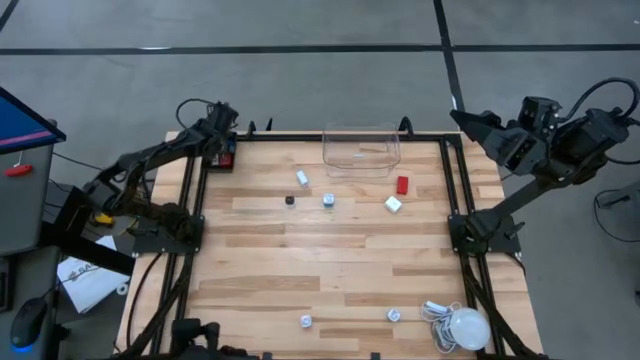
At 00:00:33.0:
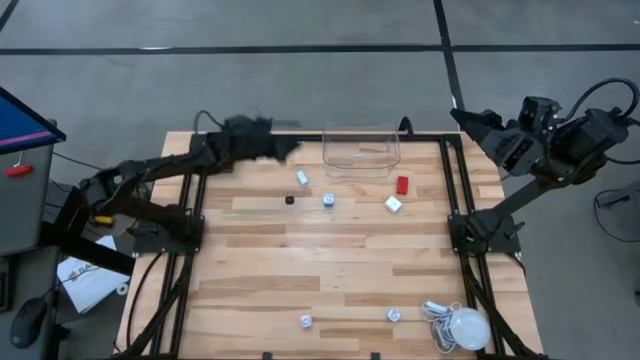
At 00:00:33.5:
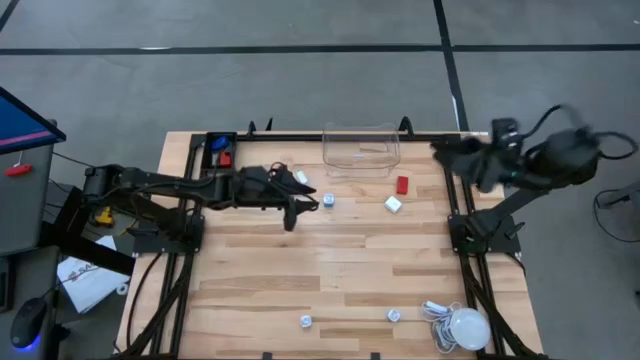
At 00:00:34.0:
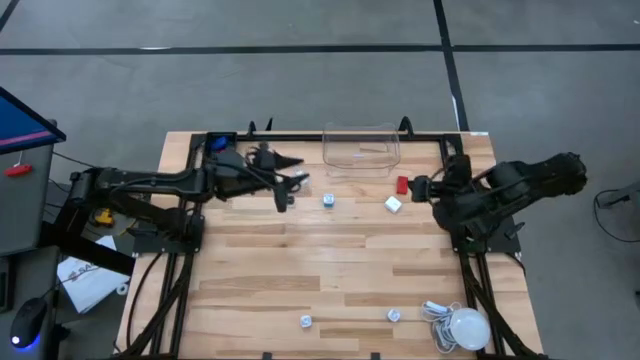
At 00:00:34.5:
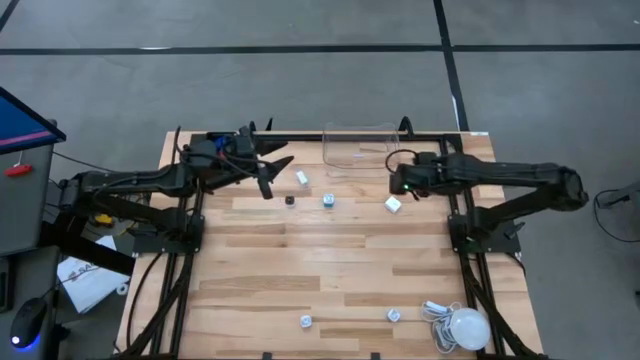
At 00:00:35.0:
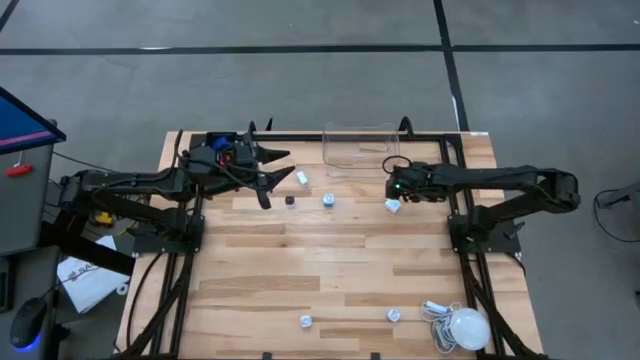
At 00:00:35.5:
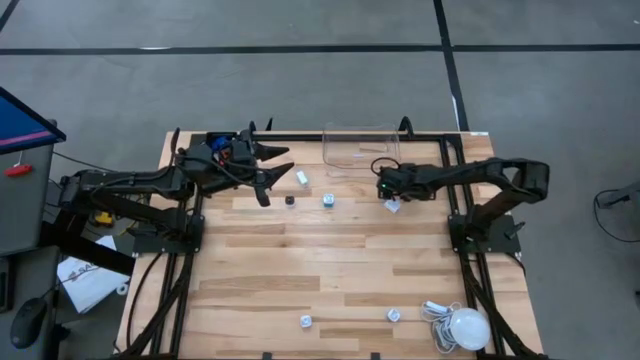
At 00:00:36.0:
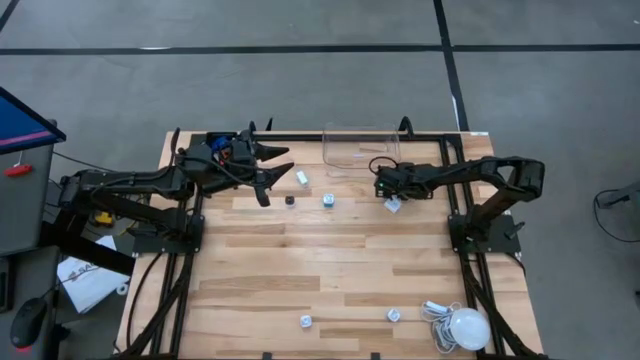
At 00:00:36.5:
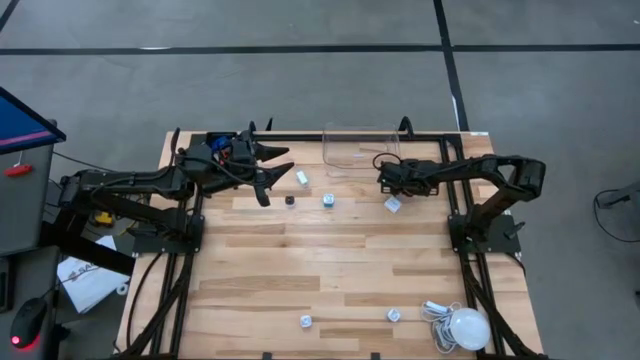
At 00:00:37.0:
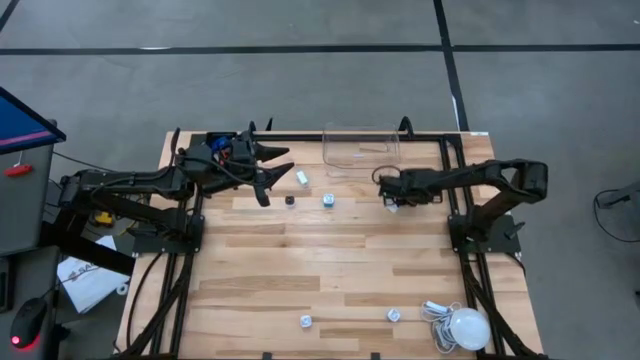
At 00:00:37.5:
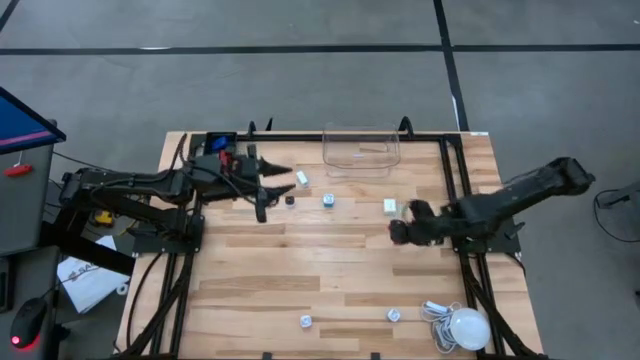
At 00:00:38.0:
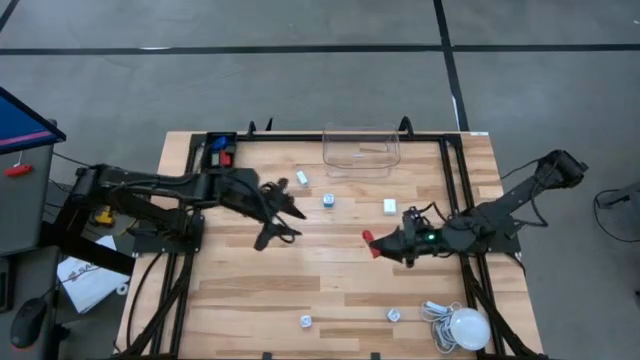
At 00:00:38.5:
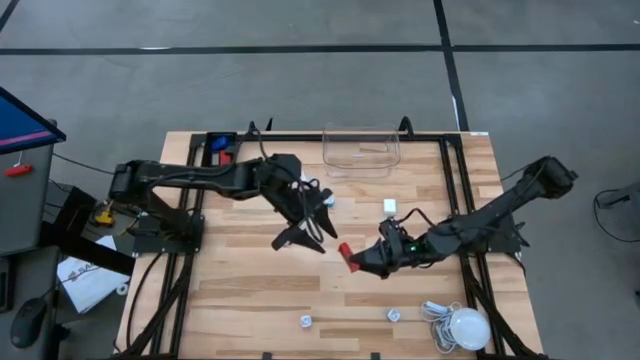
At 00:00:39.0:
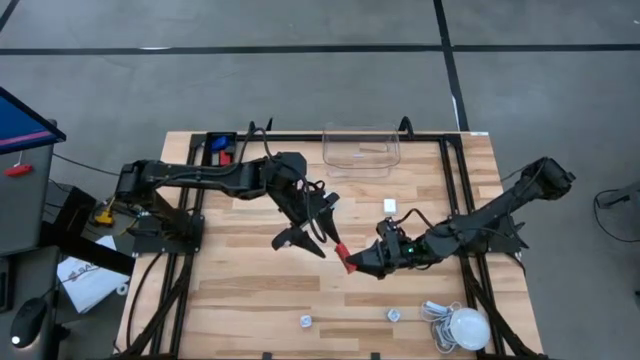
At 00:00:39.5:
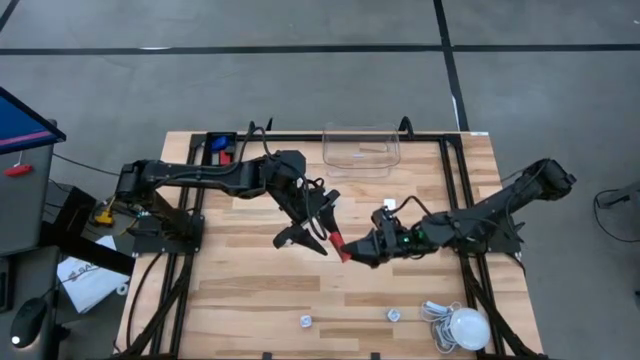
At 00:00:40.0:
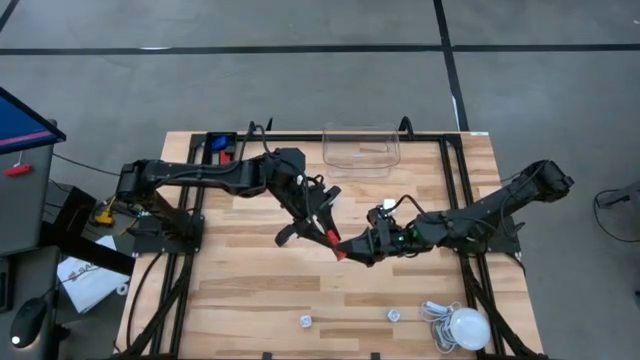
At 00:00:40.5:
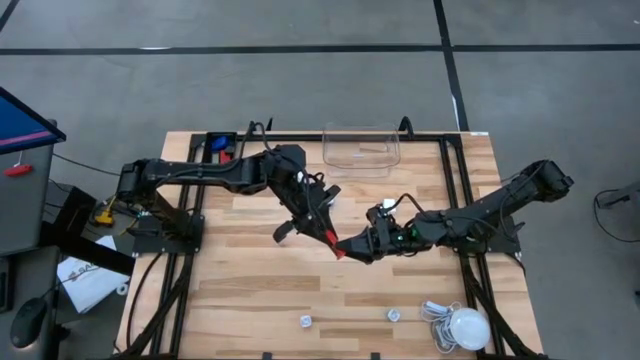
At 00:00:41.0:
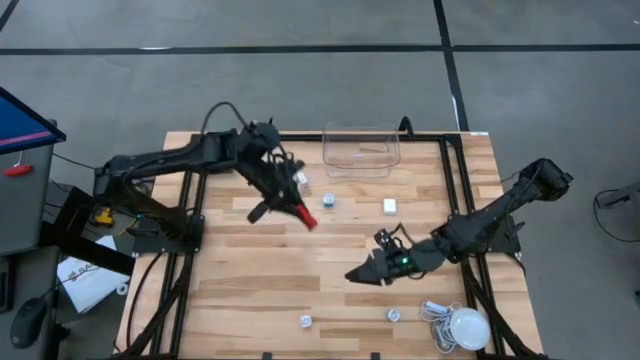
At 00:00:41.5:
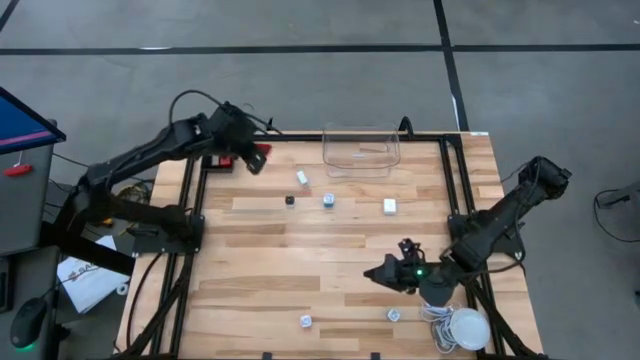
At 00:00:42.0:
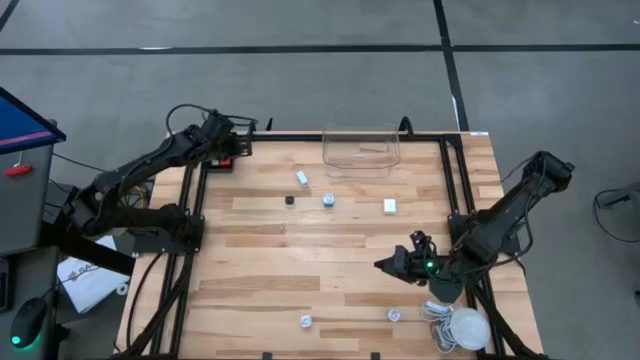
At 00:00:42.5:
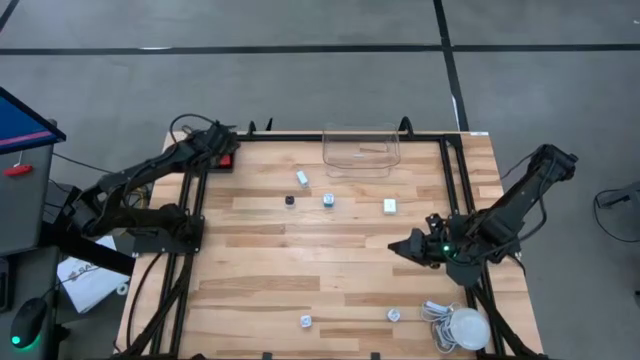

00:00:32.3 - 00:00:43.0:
Task: Pick & Place Office items
Put the red digital clock into the black basket

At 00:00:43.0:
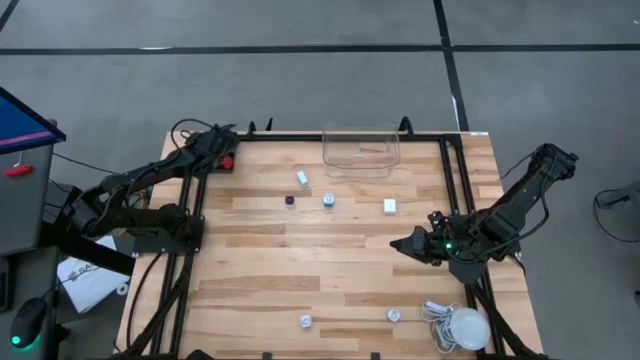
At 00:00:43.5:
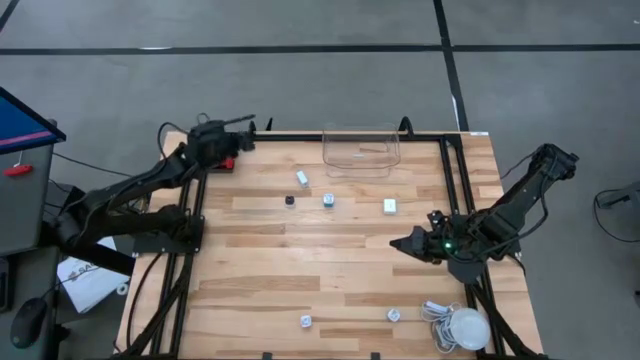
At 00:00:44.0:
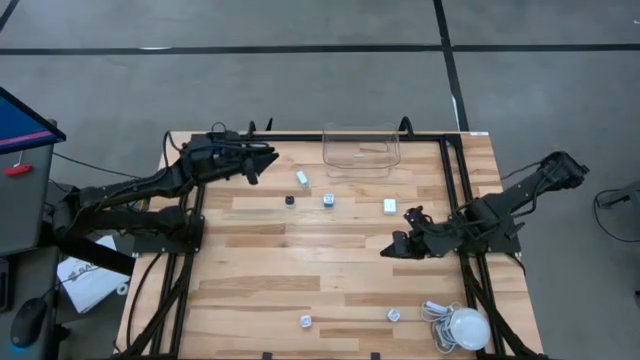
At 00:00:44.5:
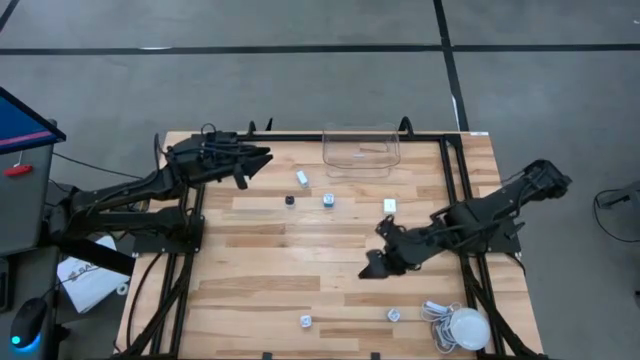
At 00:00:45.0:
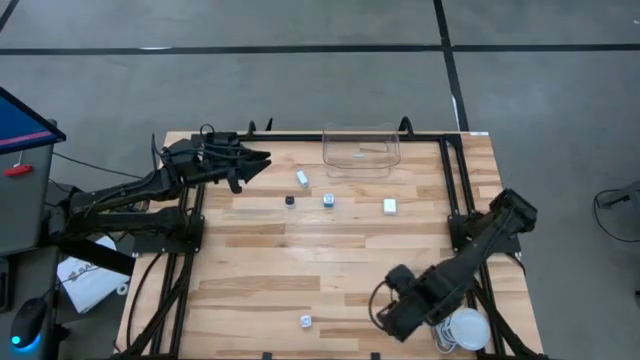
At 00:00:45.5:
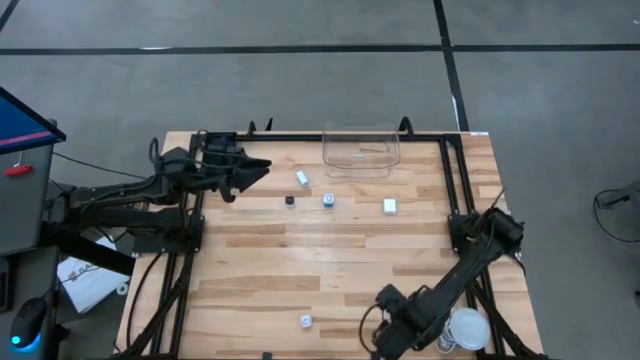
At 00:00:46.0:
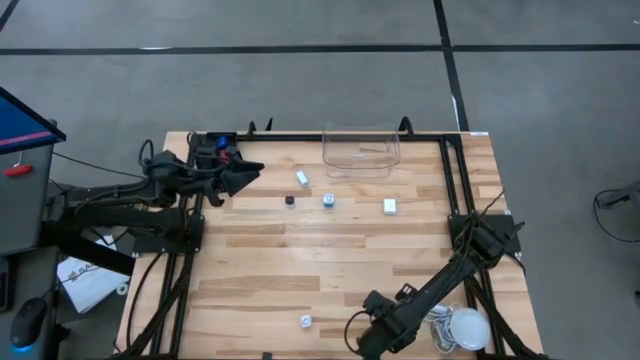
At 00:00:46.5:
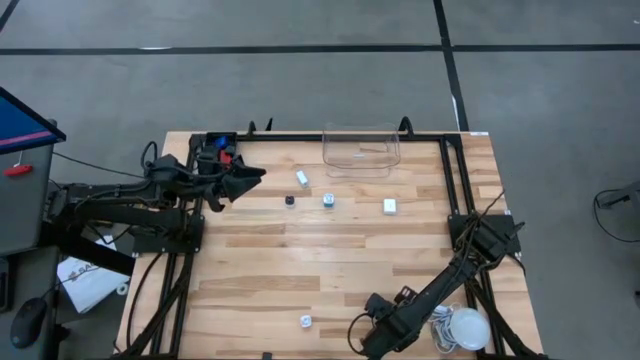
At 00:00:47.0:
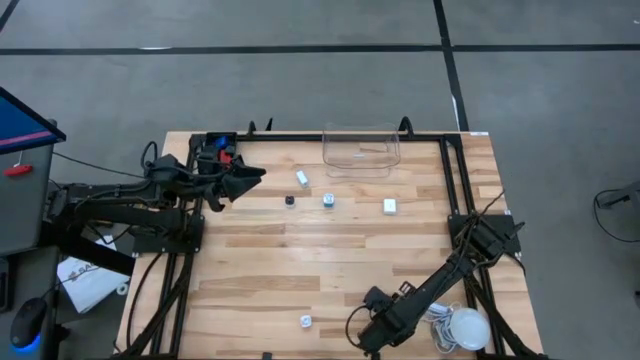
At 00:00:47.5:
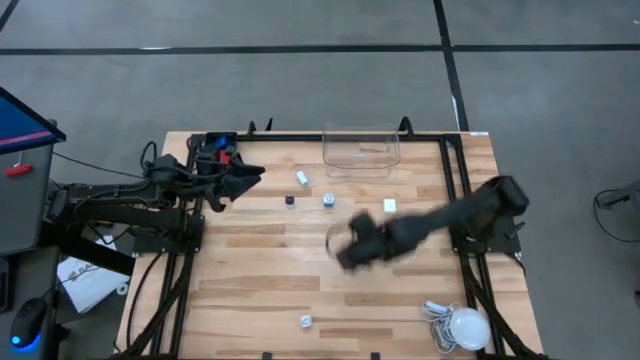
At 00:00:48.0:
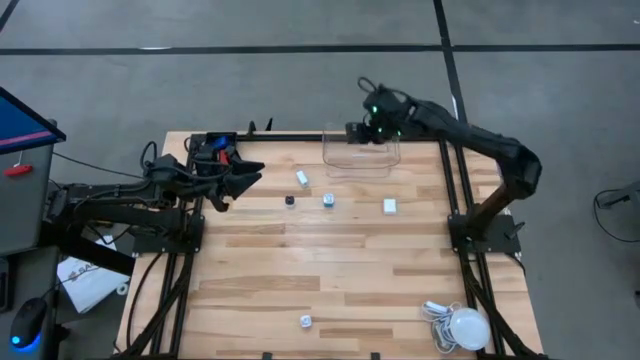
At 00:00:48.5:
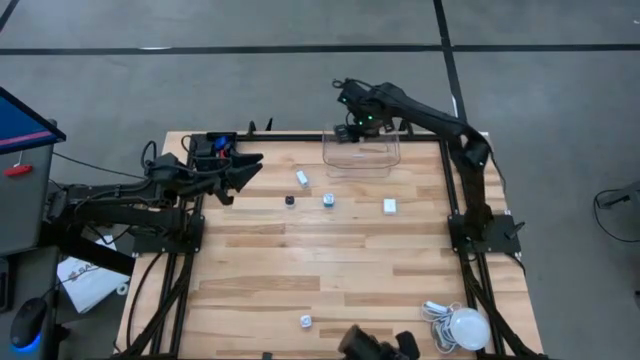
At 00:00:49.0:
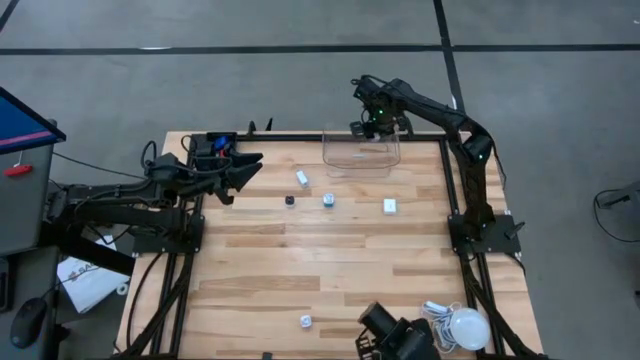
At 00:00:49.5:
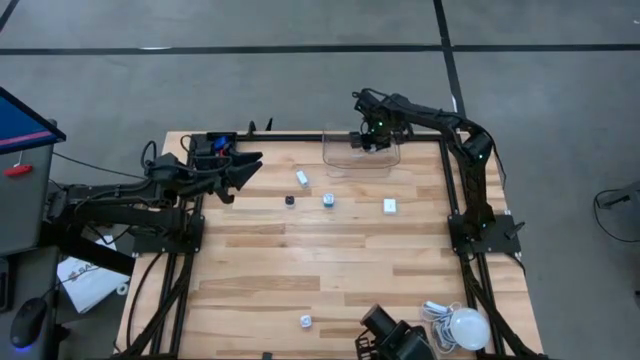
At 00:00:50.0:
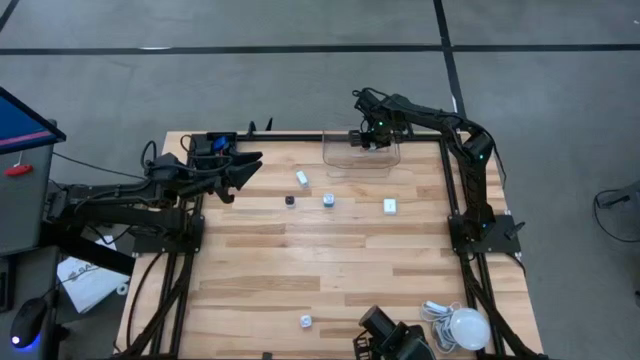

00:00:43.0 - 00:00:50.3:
Put the bottom blue charger adapter into the transparent bin

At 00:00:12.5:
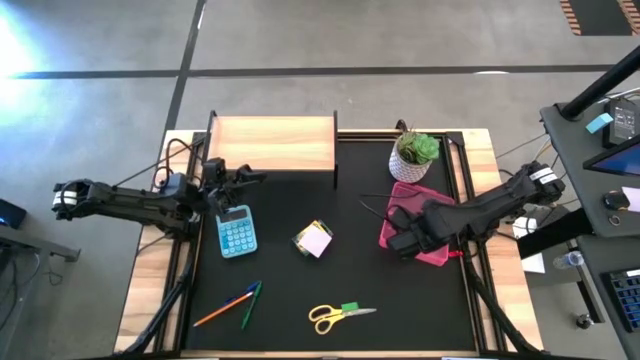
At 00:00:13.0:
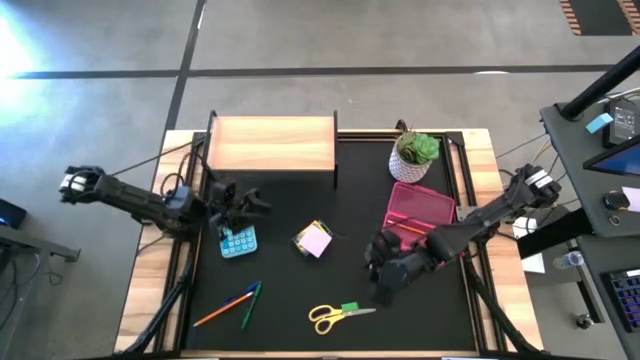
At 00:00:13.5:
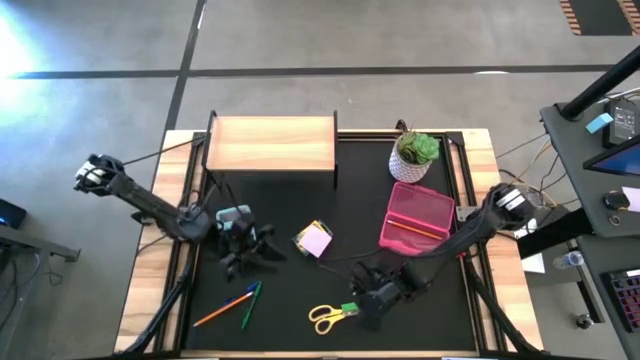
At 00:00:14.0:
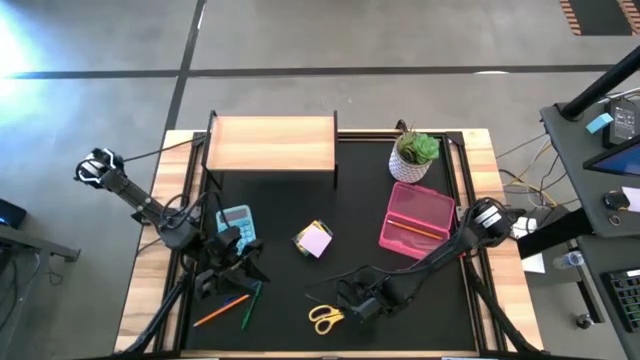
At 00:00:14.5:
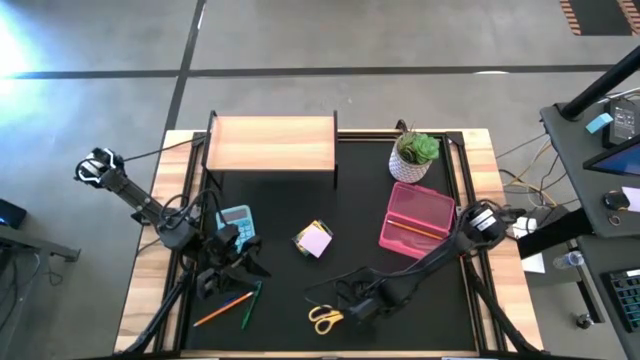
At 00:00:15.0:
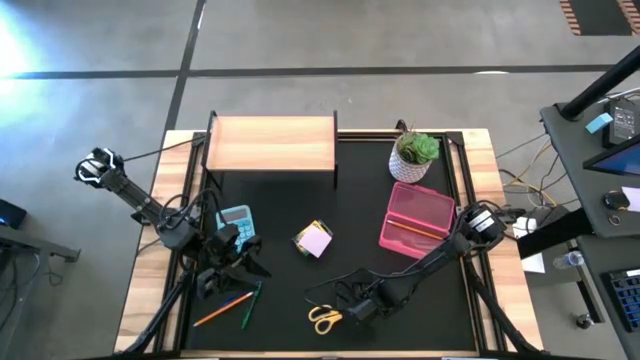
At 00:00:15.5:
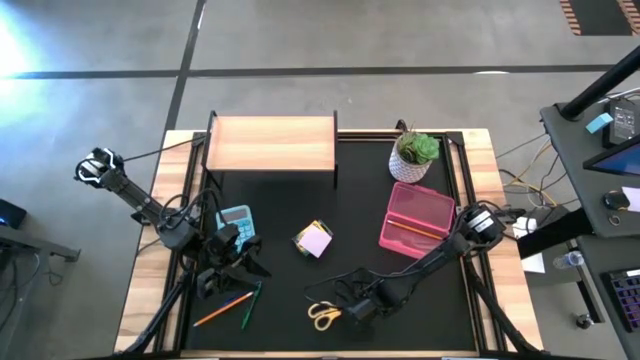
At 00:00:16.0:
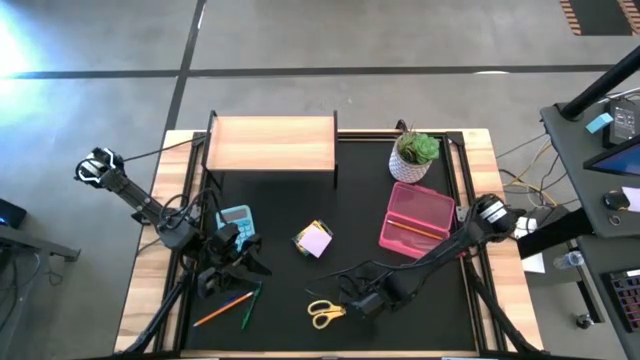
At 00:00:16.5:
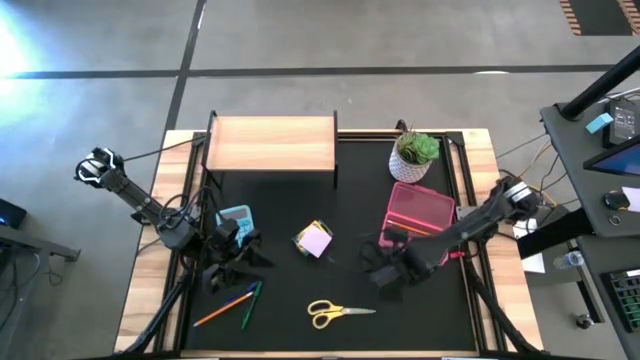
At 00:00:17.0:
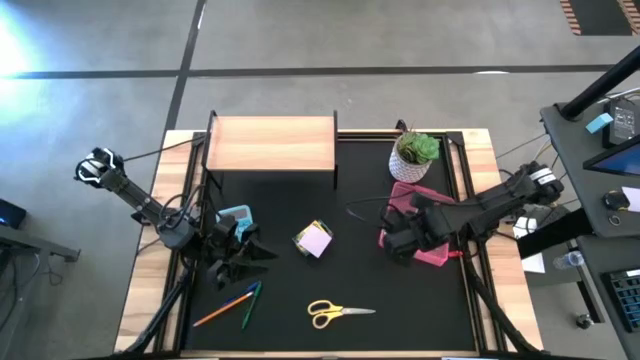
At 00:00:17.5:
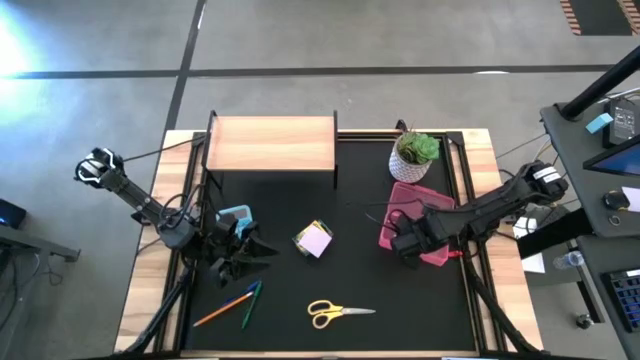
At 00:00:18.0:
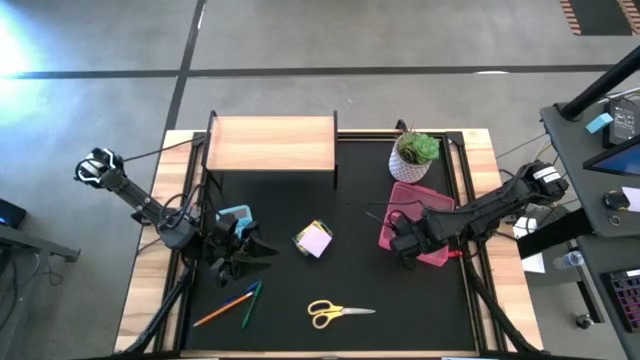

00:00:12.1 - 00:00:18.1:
Task: Pack school essentials
Put the green eraser into the pink supply box
